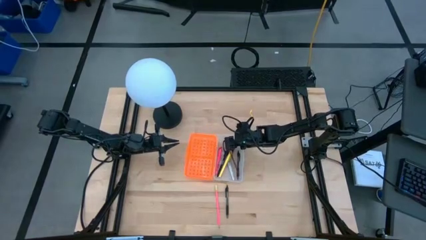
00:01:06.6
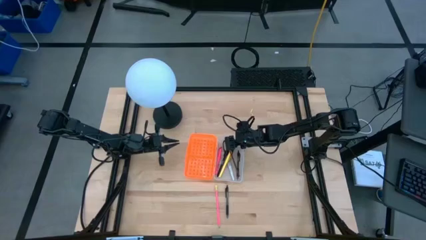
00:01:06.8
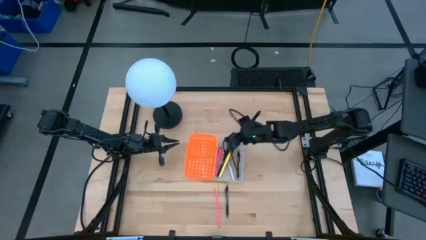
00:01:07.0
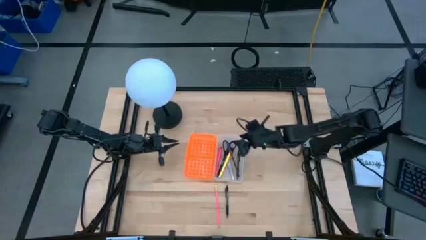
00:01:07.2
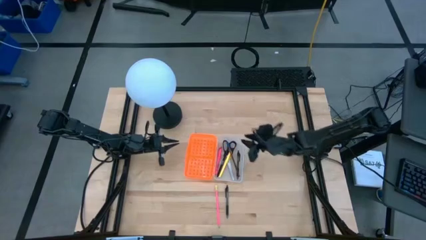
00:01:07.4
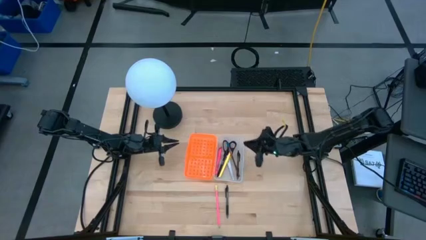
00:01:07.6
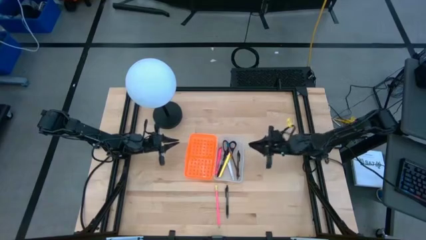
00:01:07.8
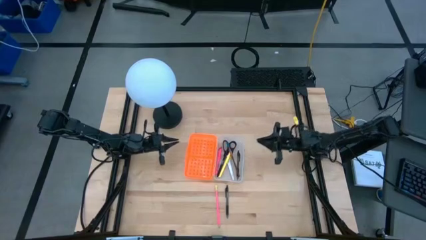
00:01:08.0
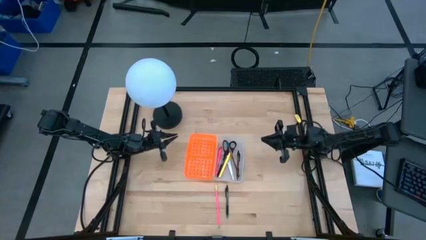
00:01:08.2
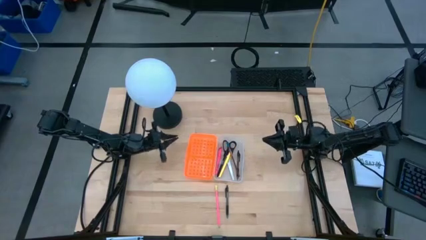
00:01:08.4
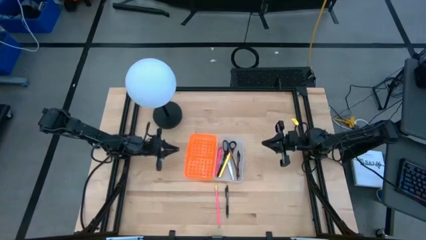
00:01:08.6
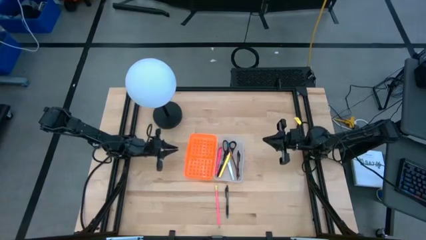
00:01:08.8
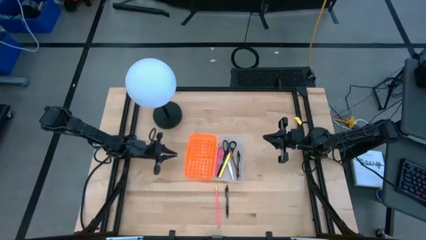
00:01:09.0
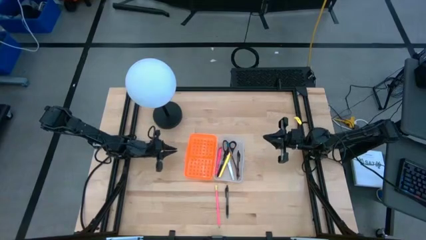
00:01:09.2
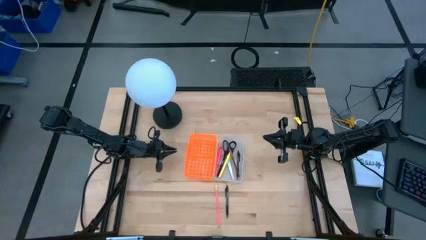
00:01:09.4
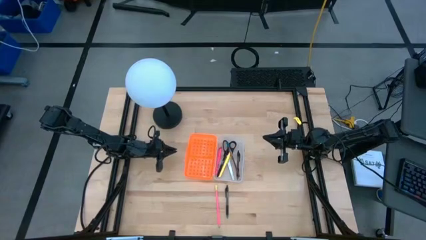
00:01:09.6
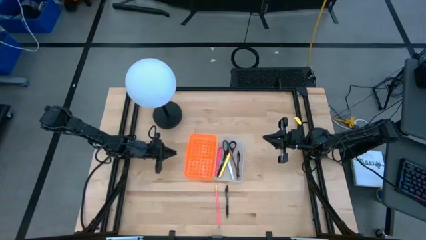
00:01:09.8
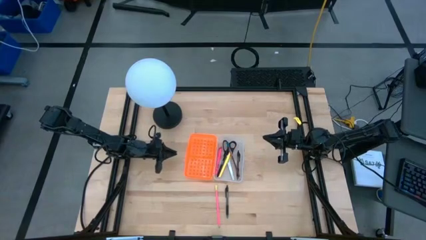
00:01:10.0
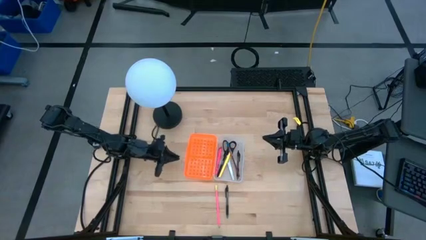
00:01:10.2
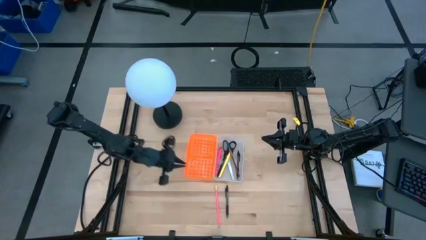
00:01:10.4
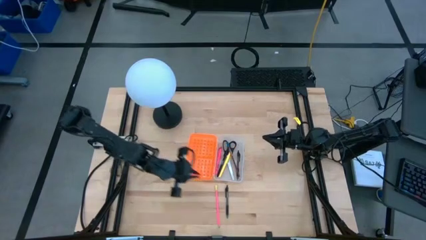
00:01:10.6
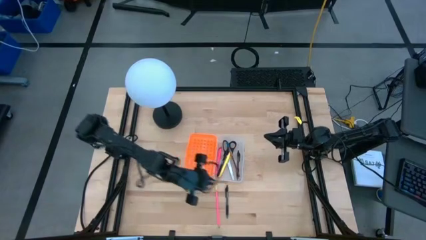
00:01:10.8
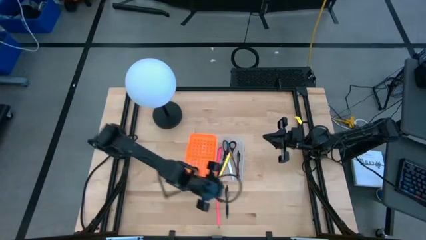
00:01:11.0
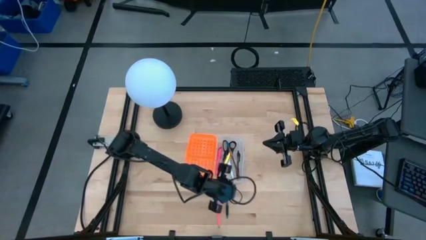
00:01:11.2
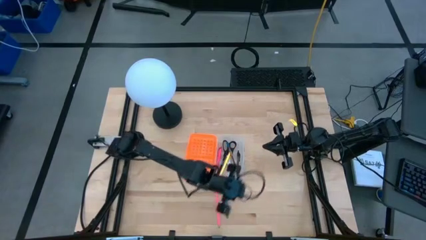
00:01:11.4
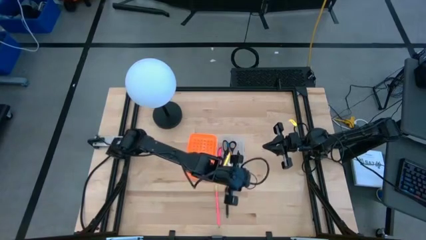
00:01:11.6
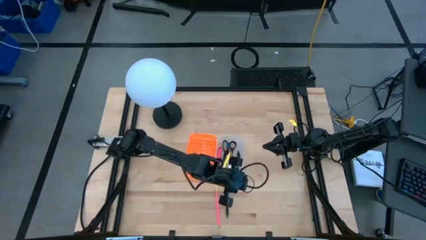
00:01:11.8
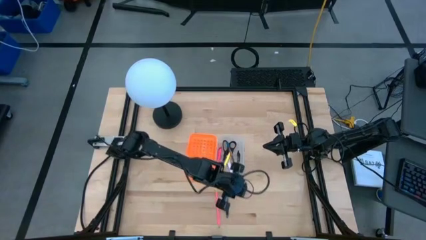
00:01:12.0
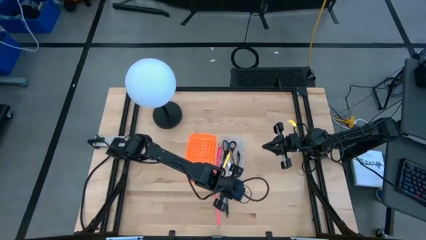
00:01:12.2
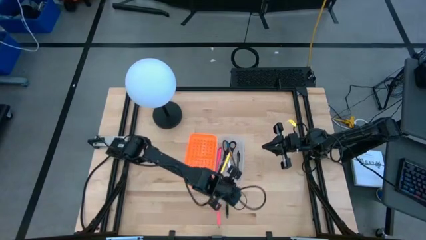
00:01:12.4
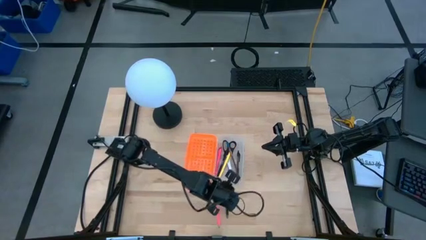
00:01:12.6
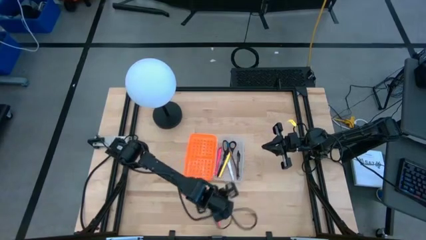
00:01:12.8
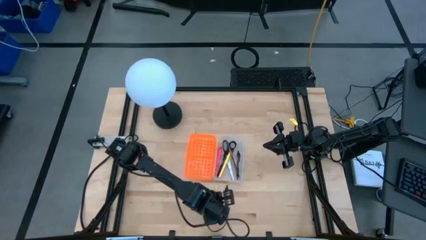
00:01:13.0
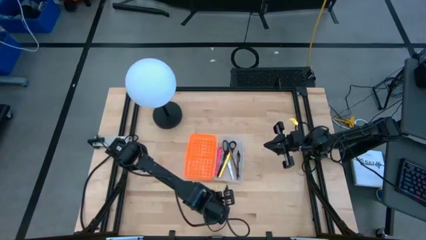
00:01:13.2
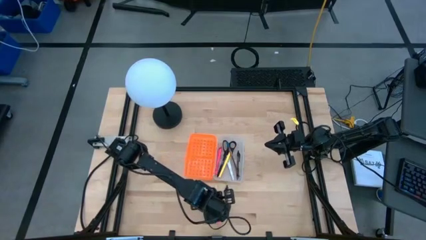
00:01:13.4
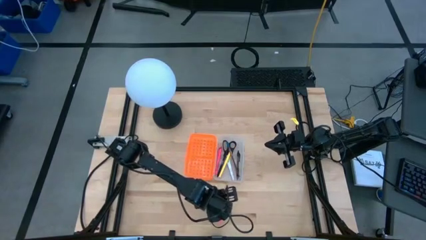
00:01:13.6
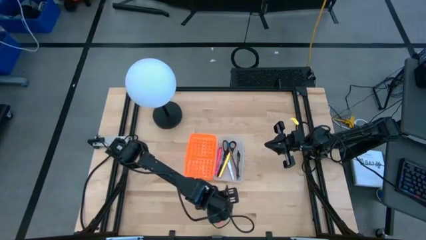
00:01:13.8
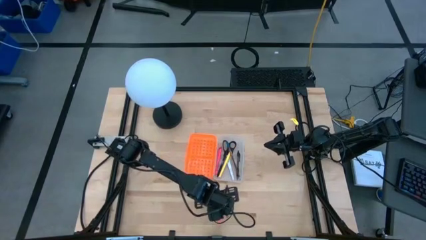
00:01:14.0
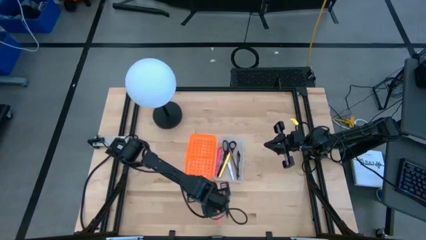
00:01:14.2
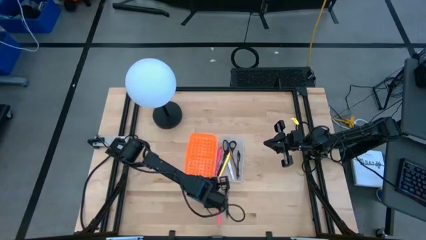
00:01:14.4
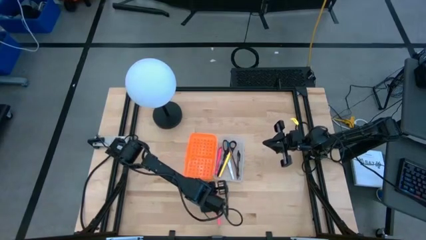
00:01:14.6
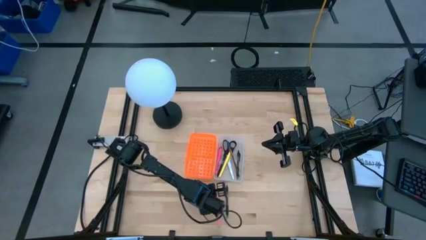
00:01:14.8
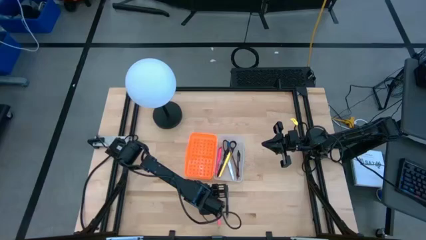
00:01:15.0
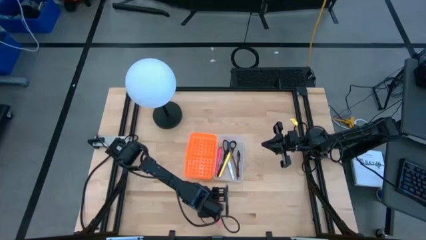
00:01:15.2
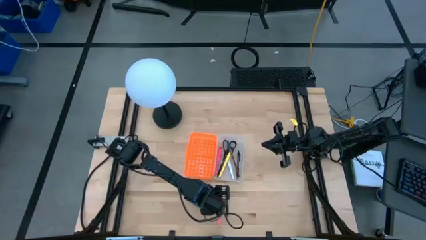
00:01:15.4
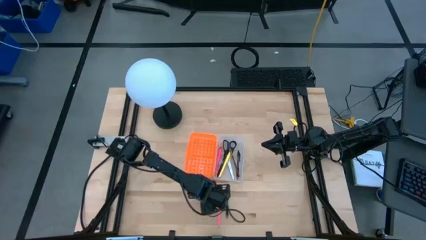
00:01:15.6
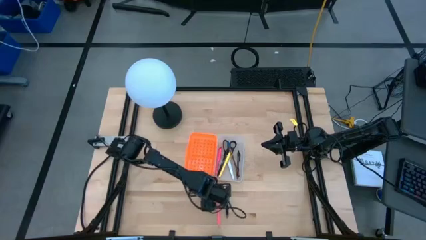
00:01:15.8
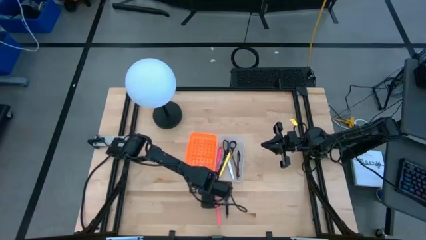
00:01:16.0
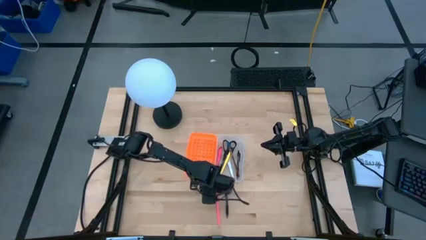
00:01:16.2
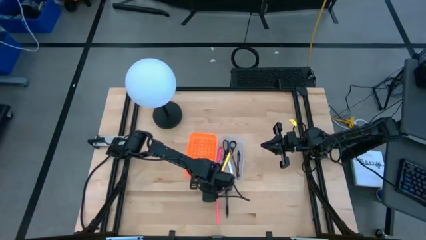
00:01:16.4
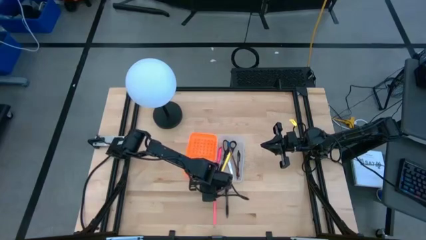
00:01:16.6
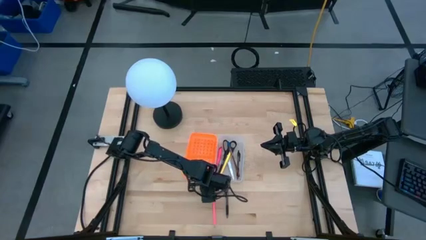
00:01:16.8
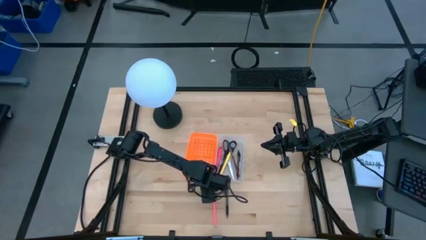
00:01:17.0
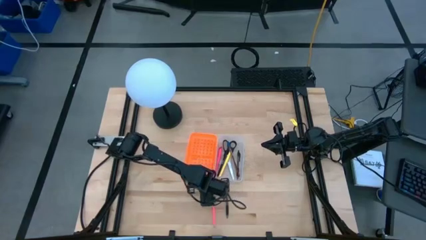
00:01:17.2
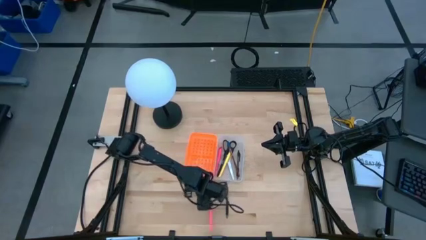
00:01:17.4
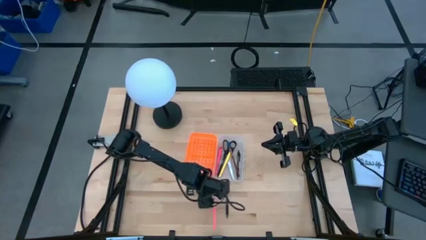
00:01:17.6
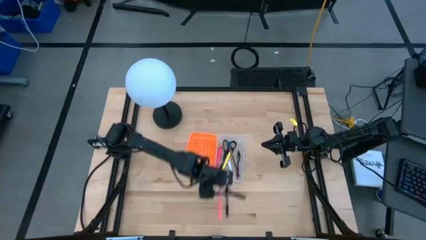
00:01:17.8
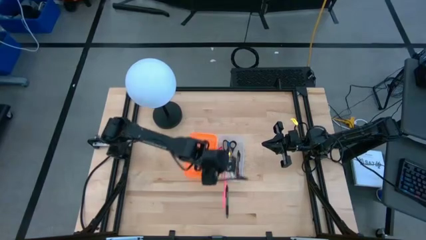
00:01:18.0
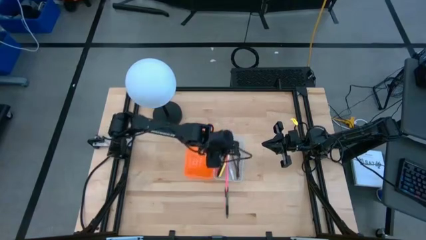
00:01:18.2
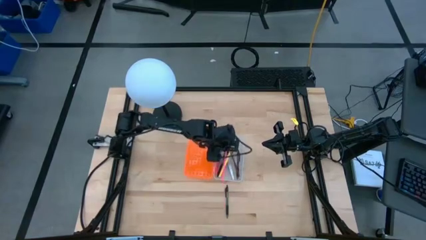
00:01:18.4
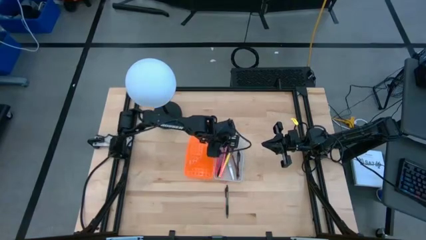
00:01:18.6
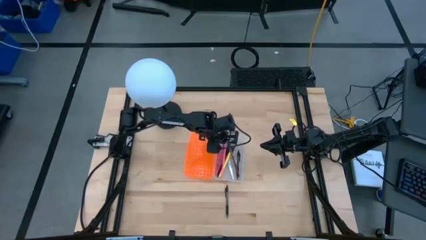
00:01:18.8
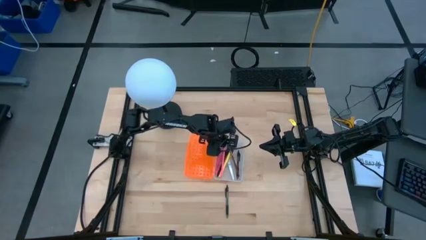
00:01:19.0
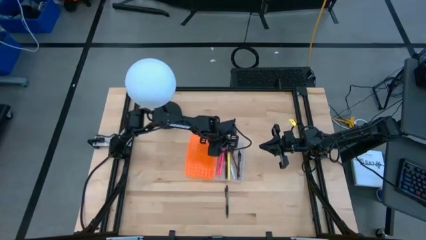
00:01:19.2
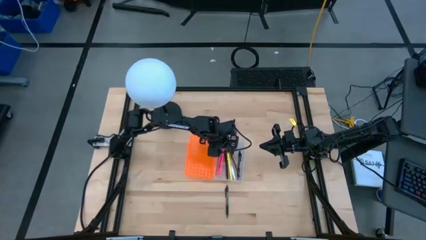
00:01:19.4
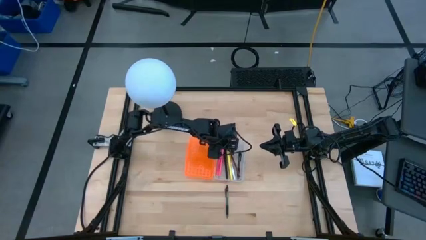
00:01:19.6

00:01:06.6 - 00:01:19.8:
Task: Pick & place school supplies into a supply box
Put the pink pencil into the orange supply box
